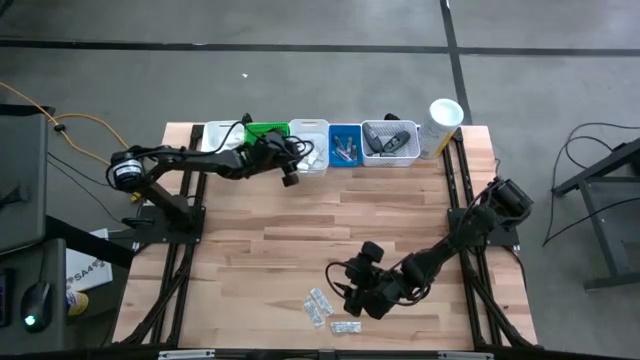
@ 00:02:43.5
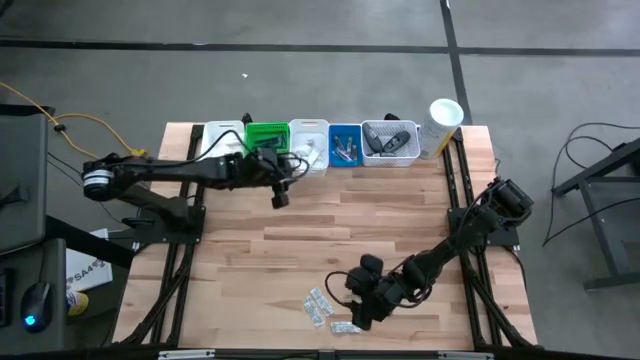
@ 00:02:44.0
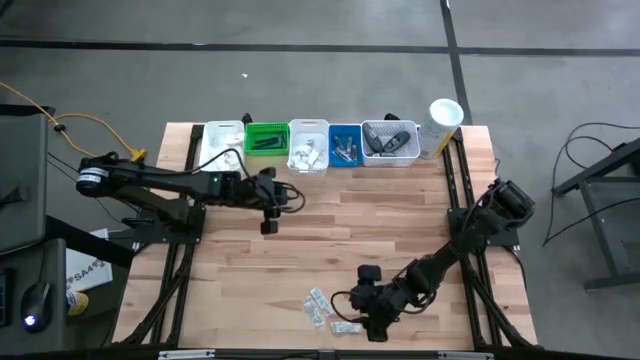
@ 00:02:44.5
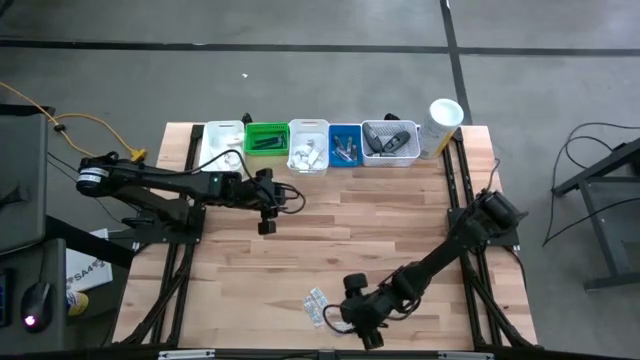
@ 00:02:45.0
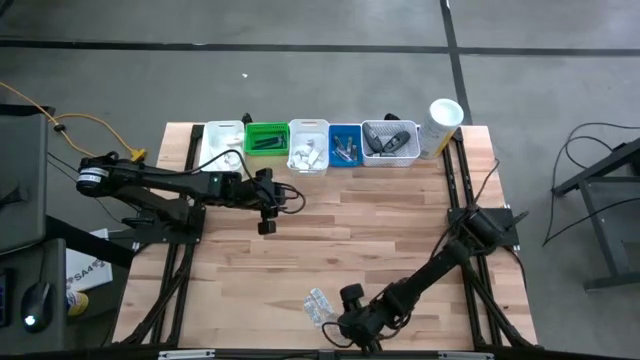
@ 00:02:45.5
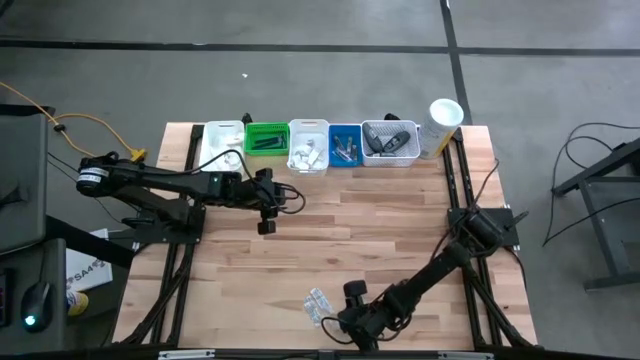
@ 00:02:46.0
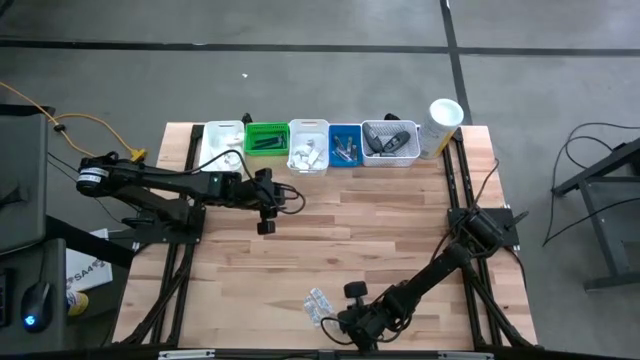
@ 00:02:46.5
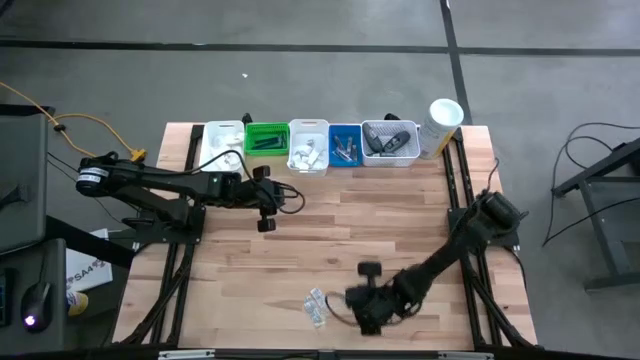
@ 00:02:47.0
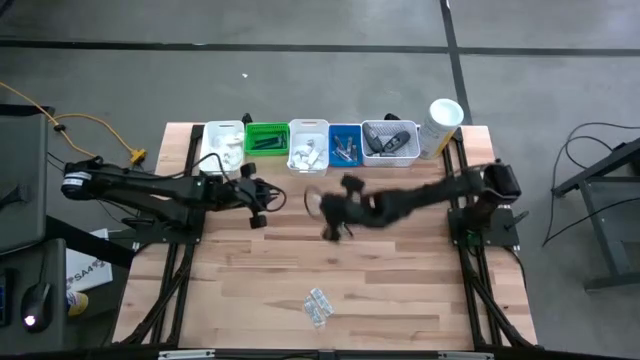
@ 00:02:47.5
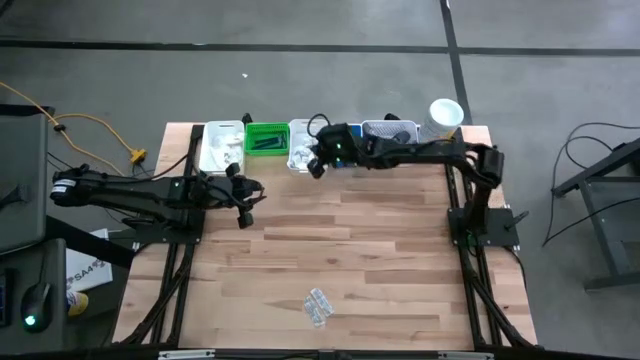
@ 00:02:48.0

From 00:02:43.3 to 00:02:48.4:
Task: Pick & Place Travel size toiletries
Put the white bandage into the middle white bin

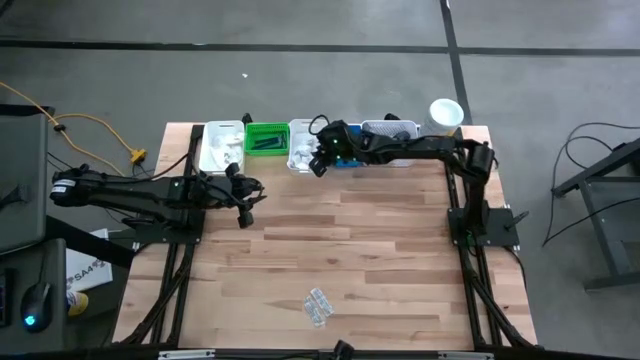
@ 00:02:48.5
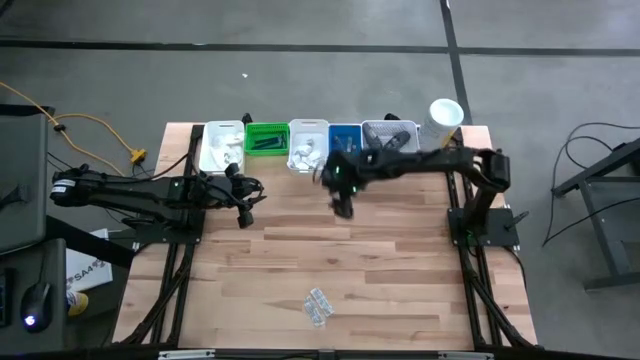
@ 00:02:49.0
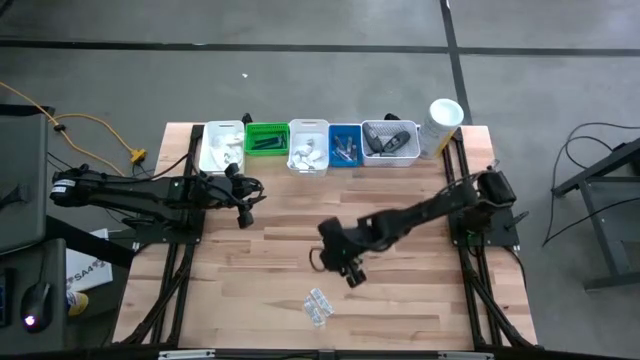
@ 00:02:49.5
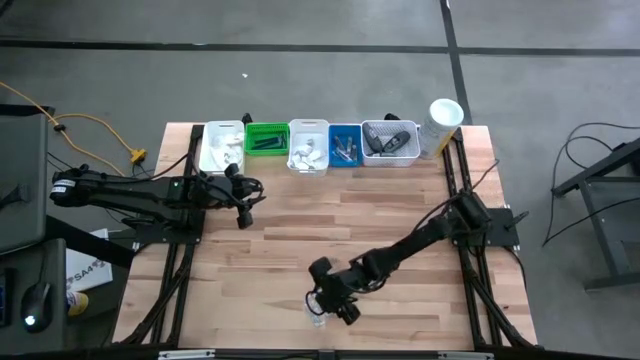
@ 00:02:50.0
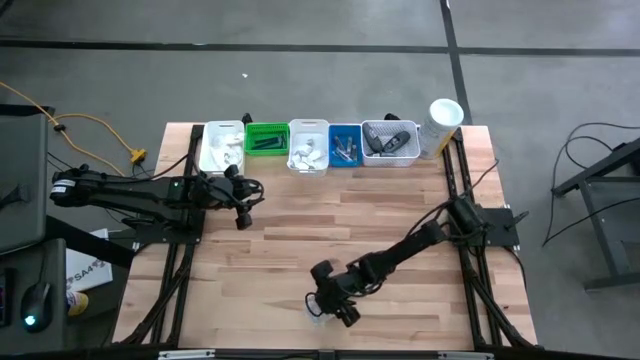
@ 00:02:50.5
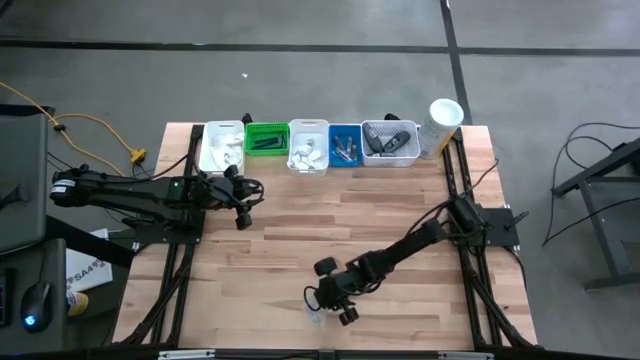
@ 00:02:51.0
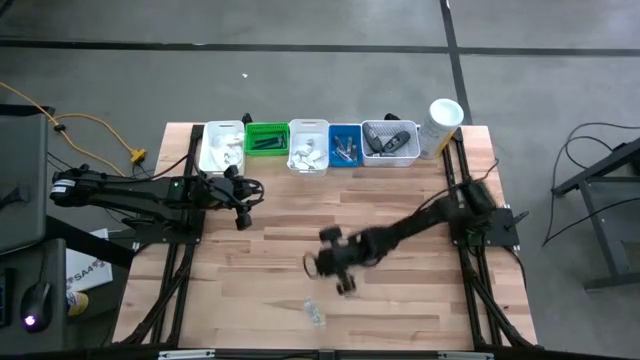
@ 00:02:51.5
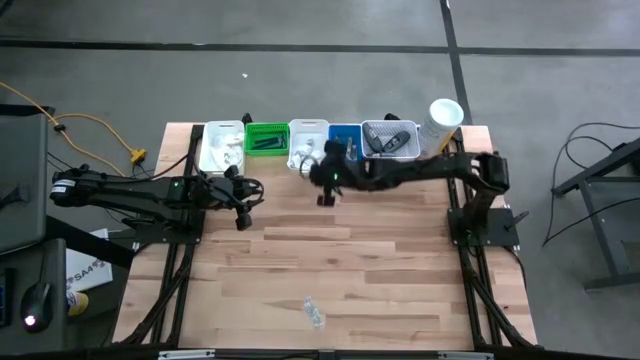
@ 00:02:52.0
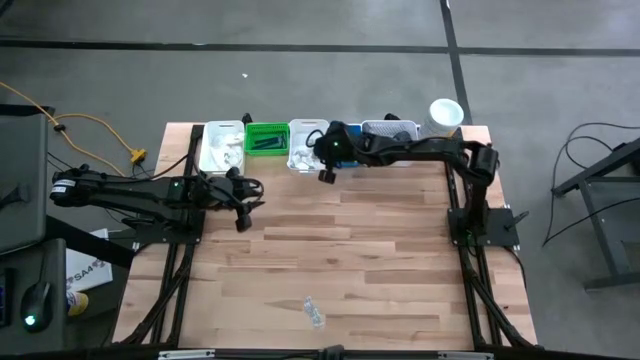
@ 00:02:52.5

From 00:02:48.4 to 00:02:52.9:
Put the white bandage into the middle white bin

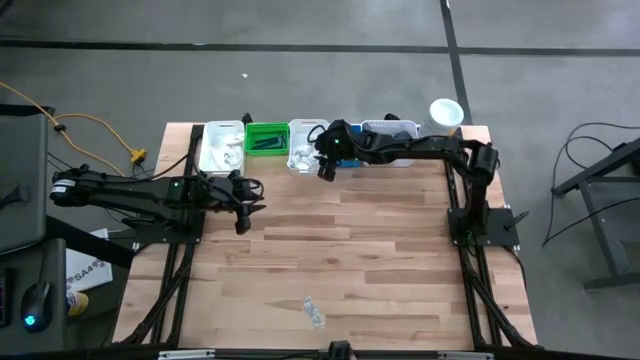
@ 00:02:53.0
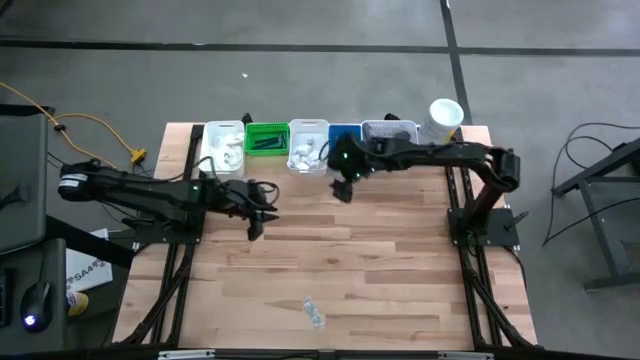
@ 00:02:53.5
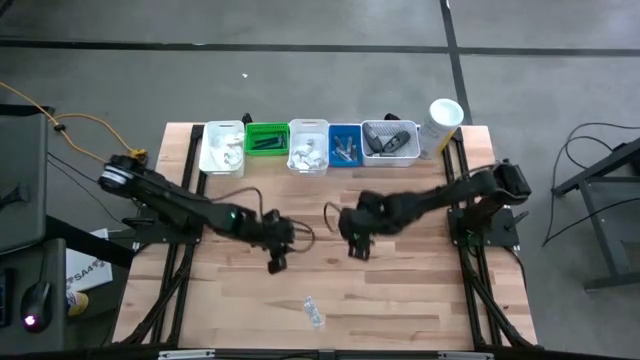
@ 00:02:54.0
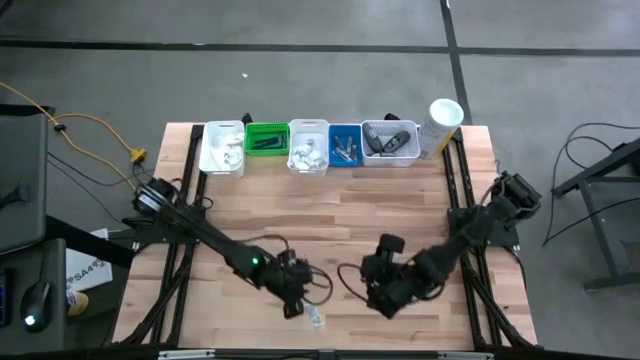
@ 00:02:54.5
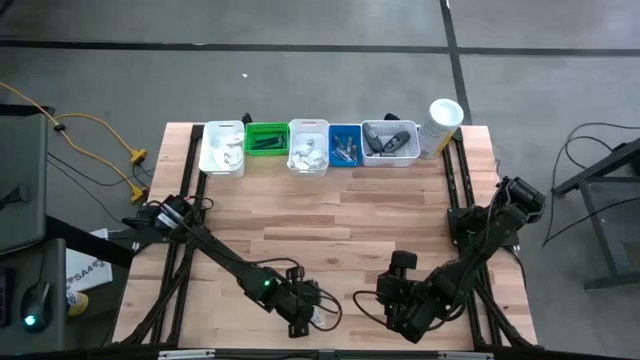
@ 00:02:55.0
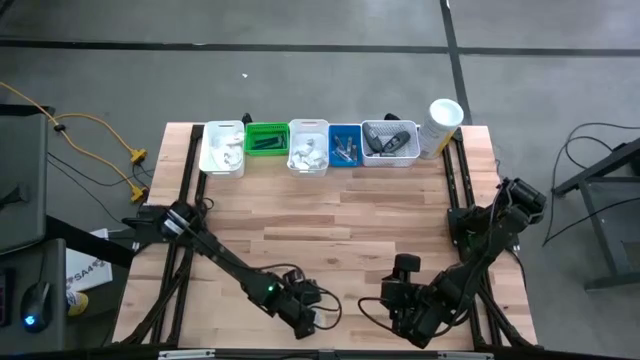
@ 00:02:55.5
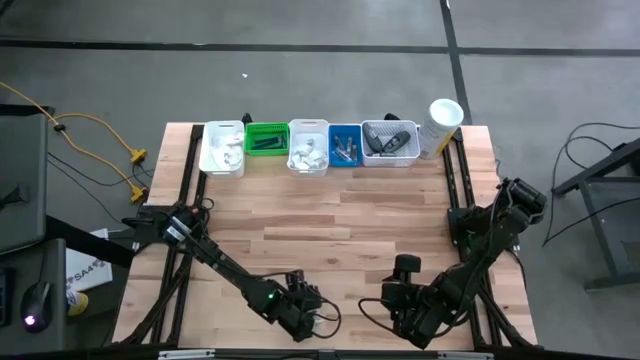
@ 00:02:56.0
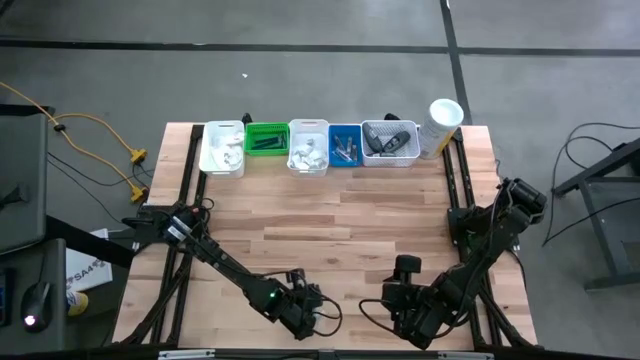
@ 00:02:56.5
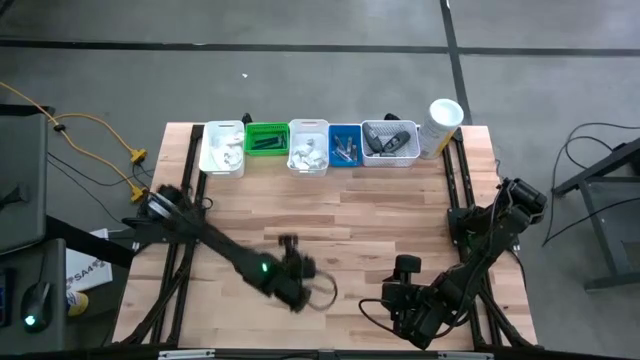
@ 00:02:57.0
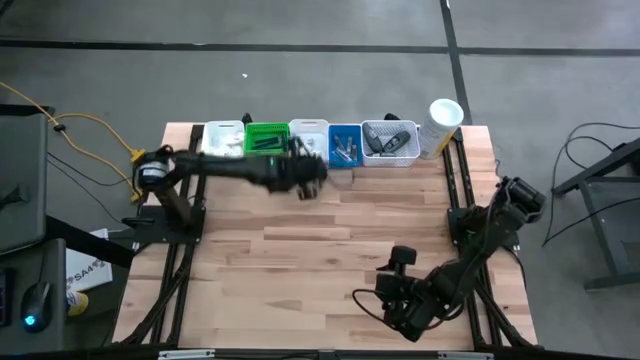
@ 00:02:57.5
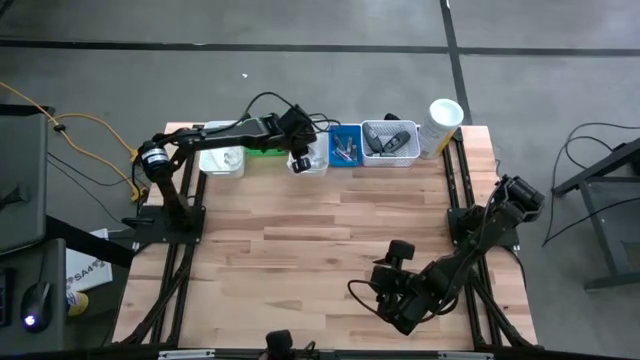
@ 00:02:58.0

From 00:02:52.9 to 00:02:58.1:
Put the white bandage into the middle white bin

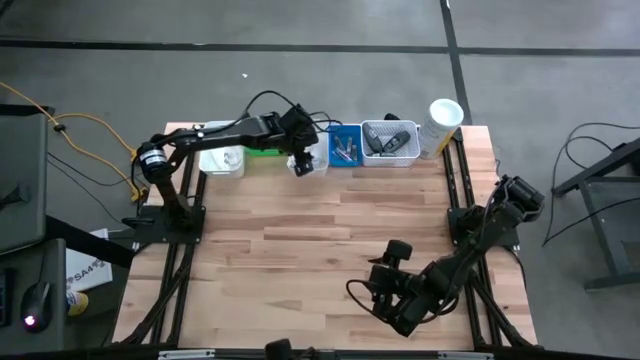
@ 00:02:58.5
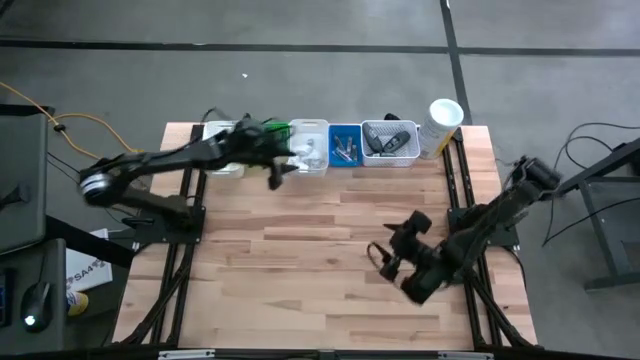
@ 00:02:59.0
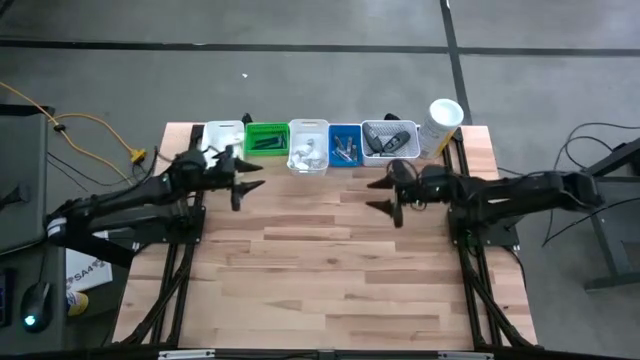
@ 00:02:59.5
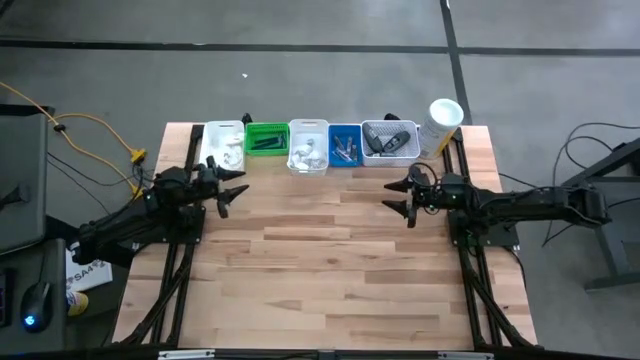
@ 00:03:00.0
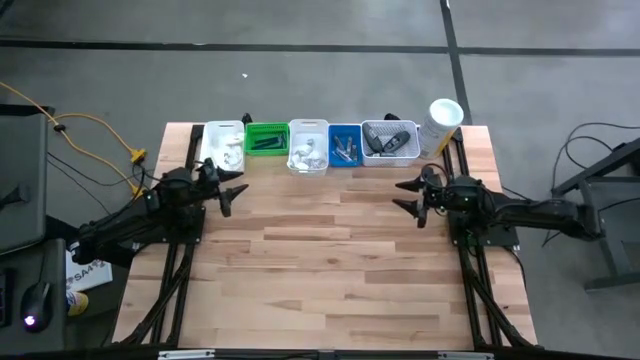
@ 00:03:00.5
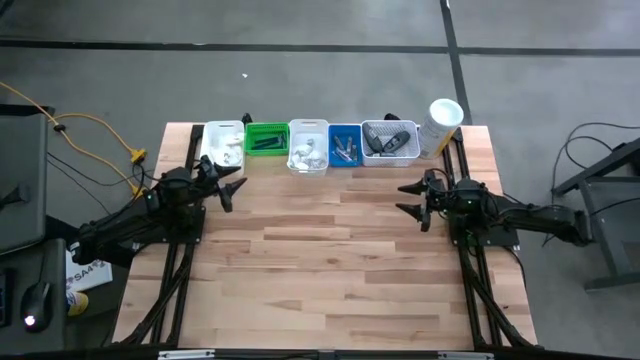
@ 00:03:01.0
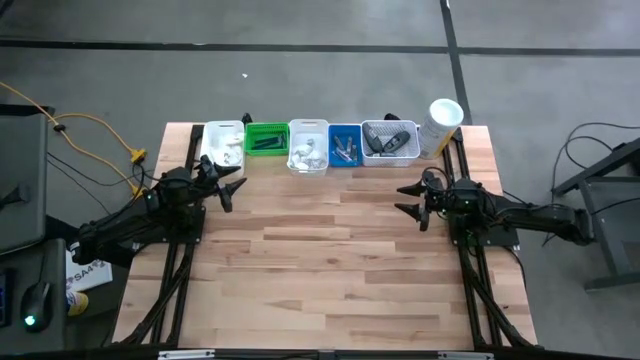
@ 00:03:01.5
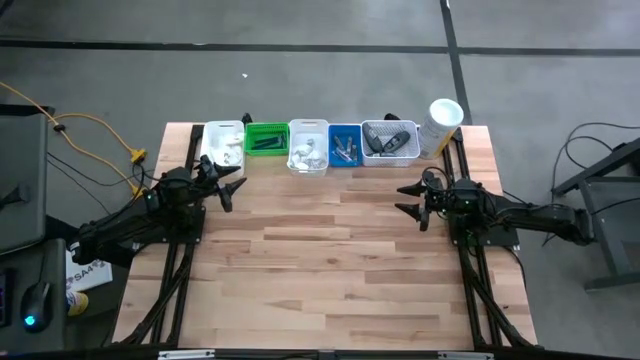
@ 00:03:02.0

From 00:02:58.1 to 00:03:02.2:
Return to Home Position
